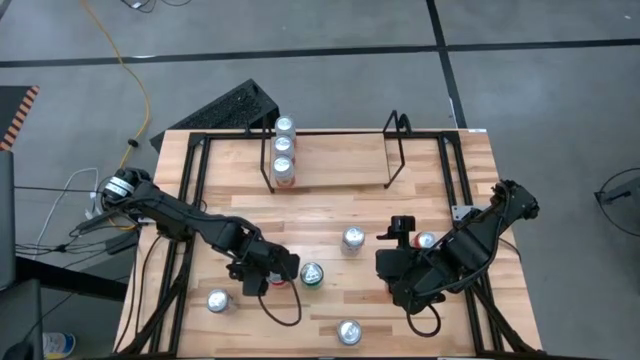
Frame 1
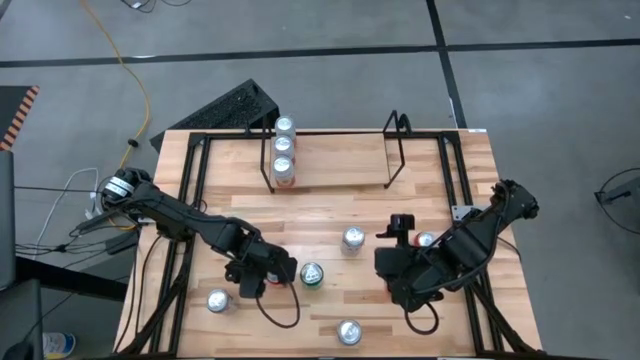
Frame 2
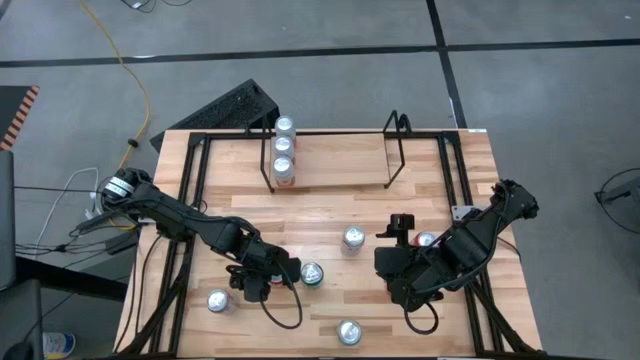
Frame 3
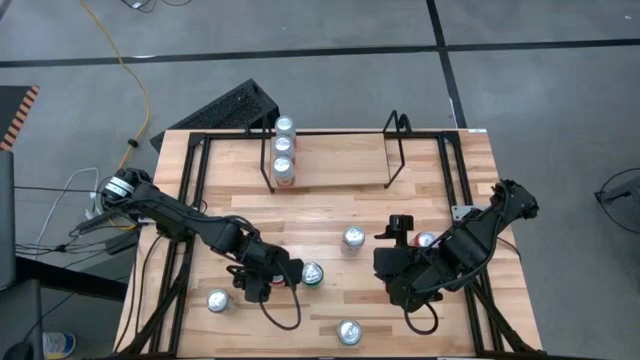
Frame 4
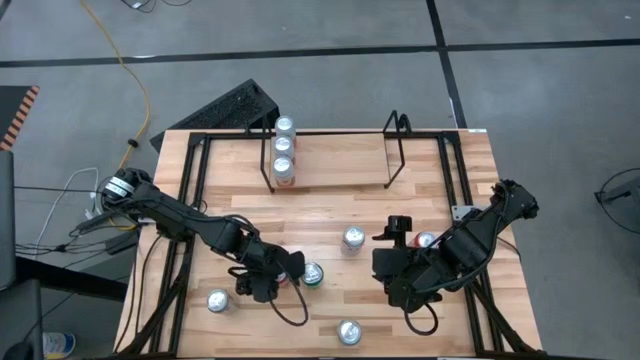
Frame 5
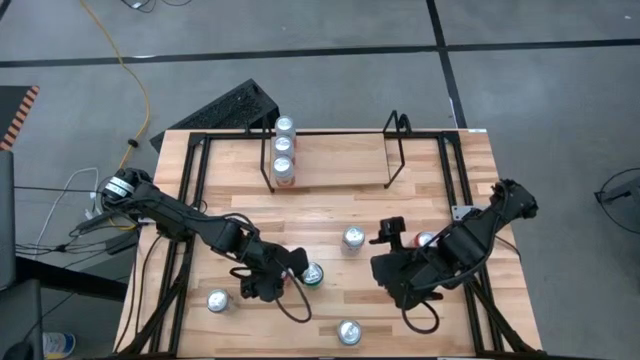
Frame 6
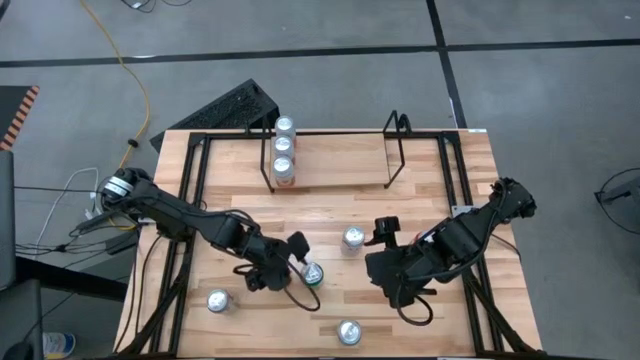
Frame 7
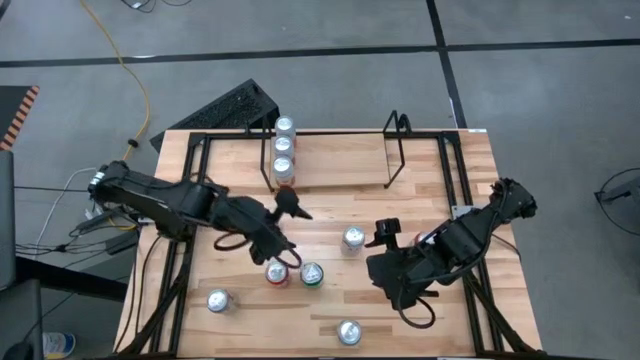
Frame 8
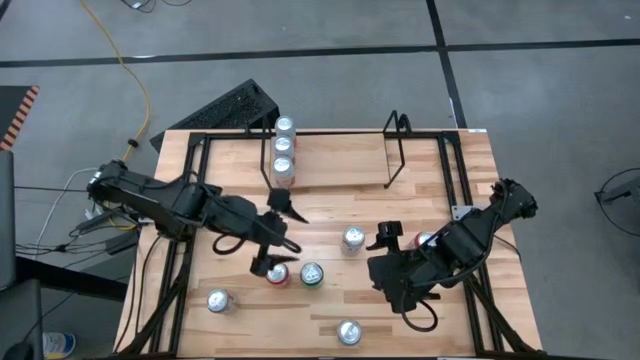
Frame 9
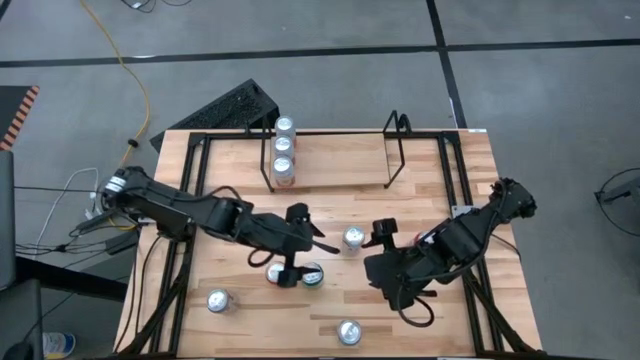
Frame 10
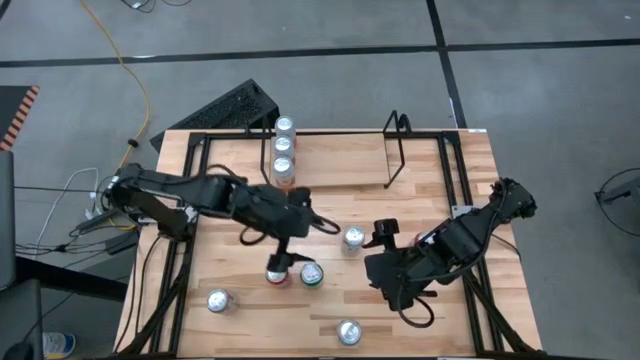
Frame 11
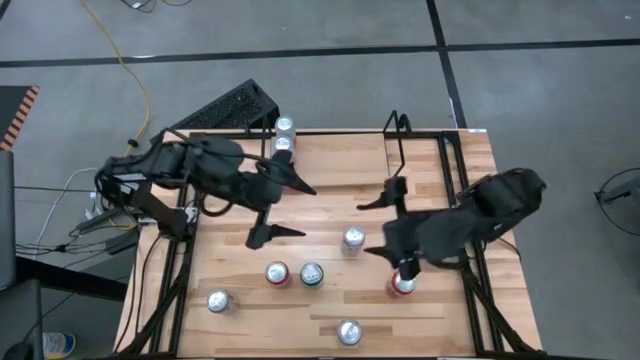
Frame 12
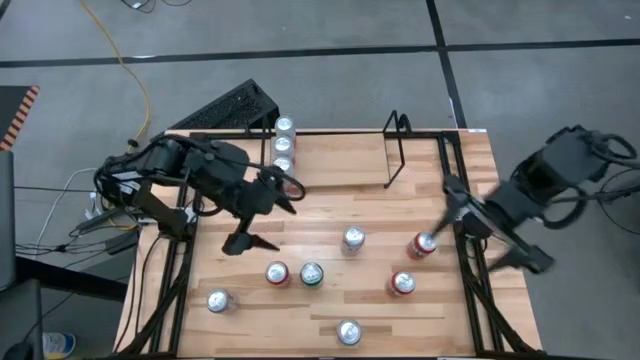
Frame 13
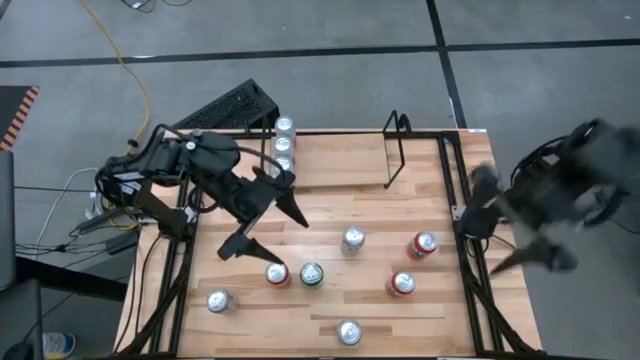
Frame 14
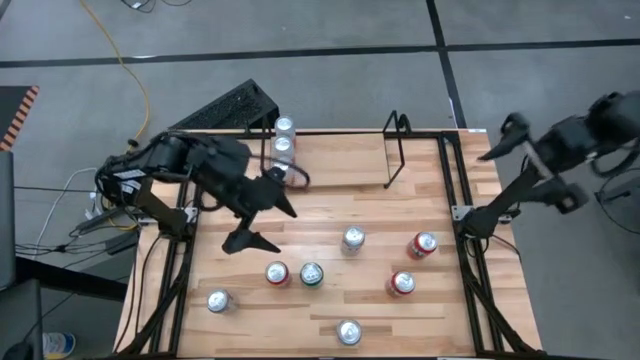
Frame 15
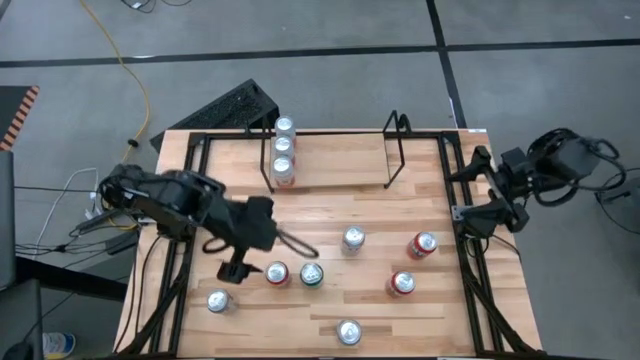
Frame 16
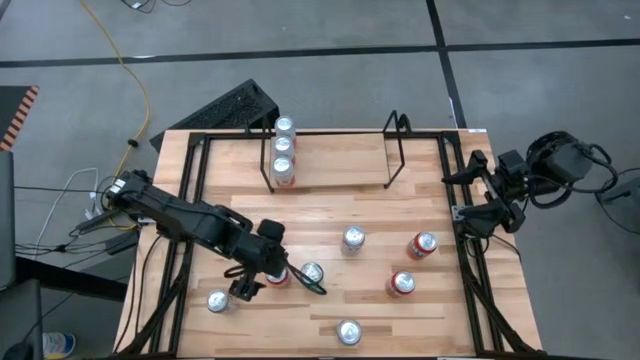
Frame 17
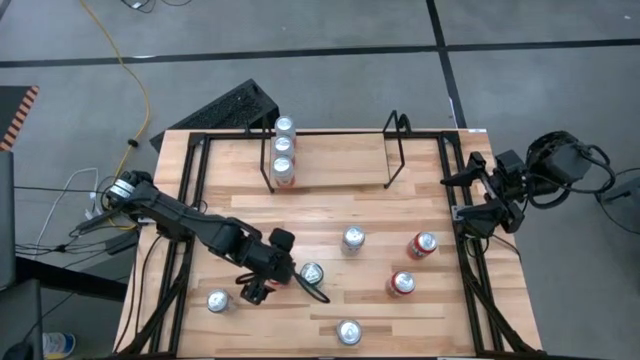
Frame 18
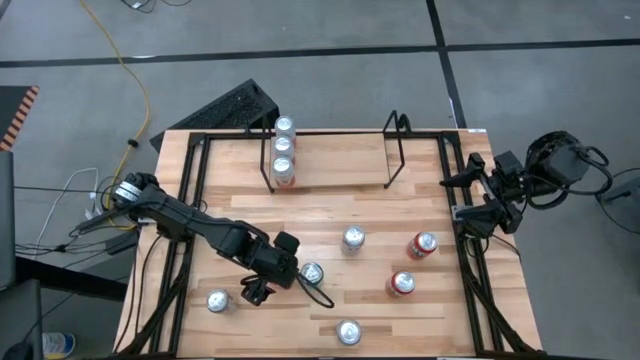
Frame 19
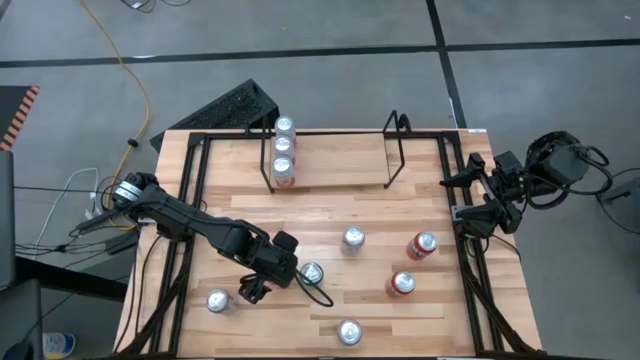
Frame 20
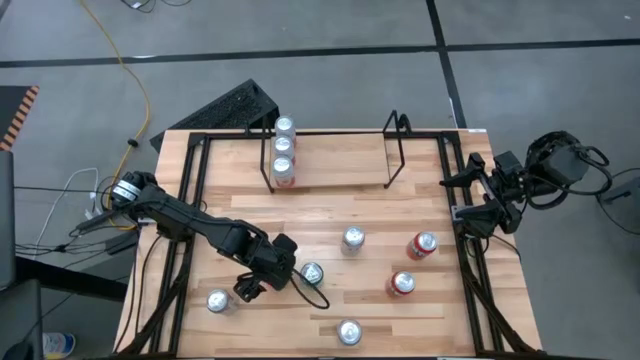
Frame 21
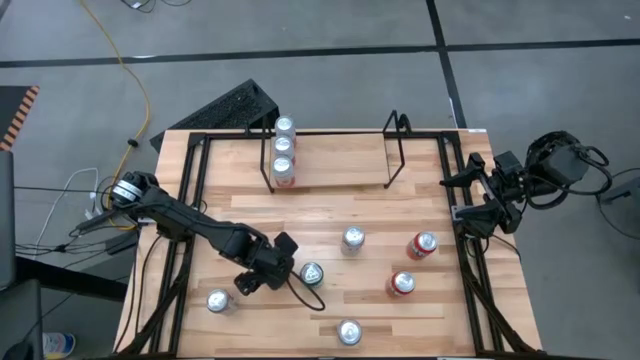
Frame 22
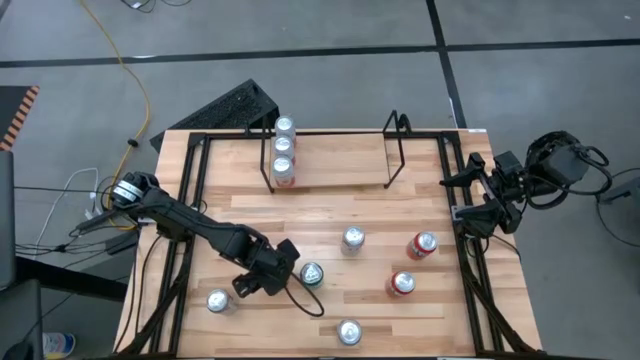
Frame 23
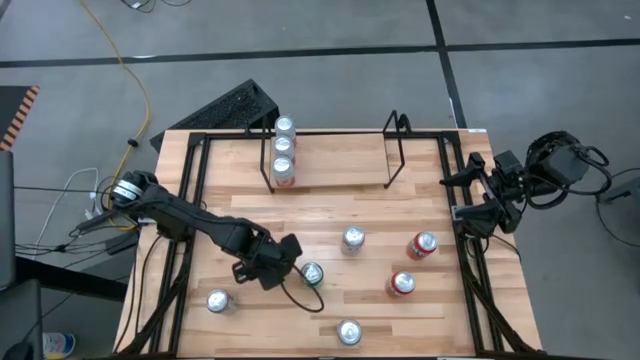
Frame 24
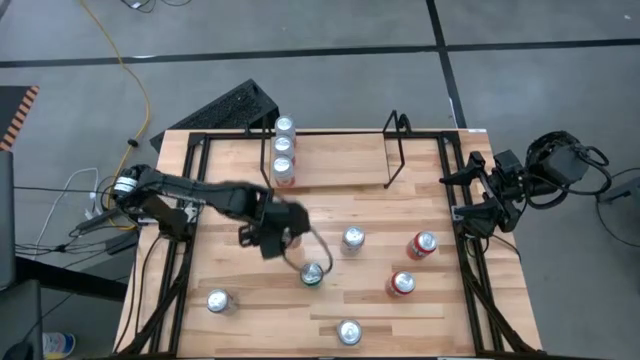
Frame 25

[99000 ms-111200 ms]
Task: Place canned beverage on shelf
Put the top left red soda can on the shelf

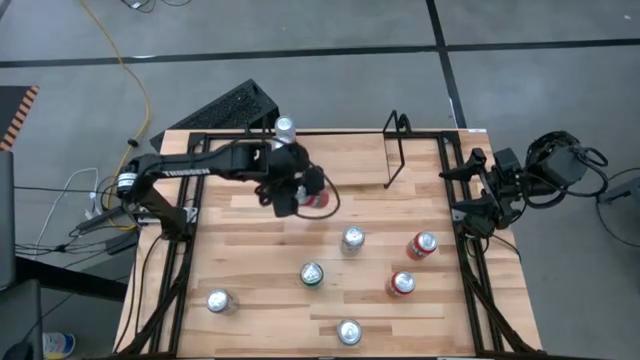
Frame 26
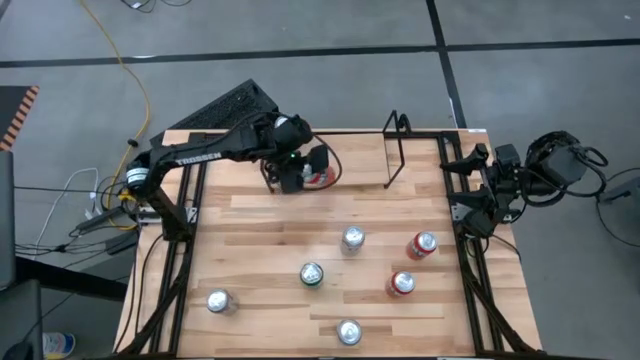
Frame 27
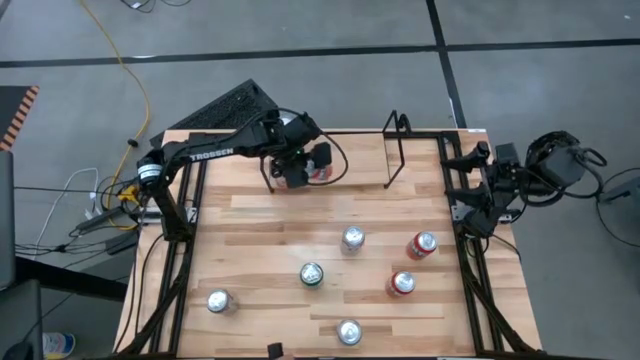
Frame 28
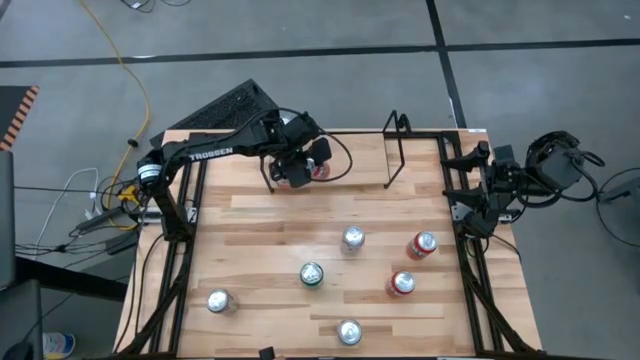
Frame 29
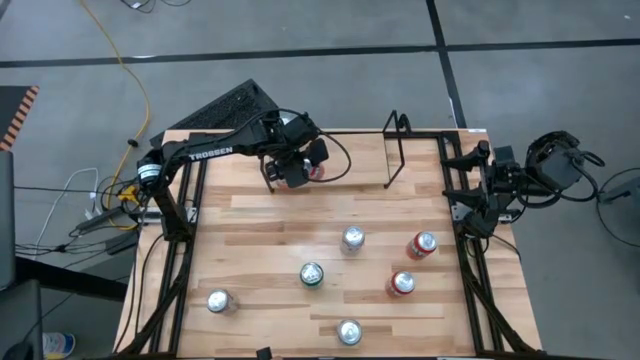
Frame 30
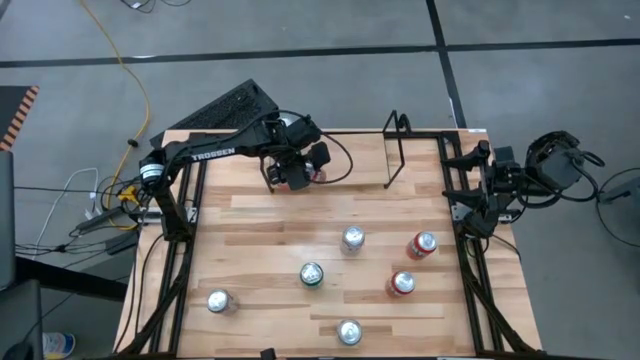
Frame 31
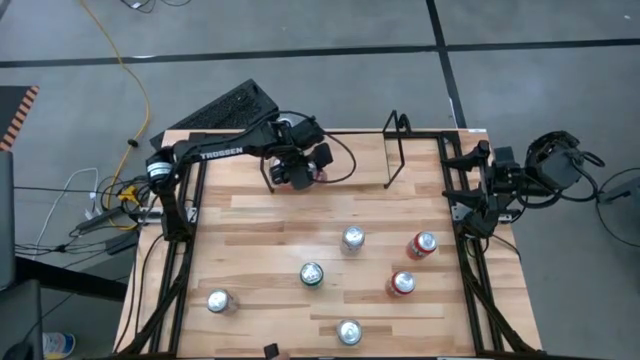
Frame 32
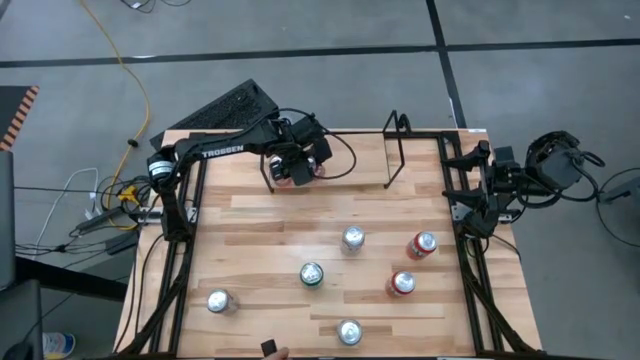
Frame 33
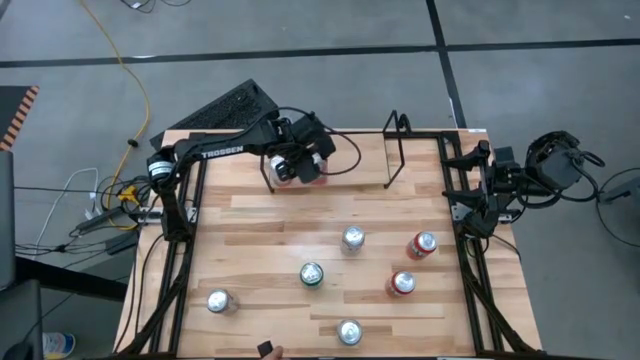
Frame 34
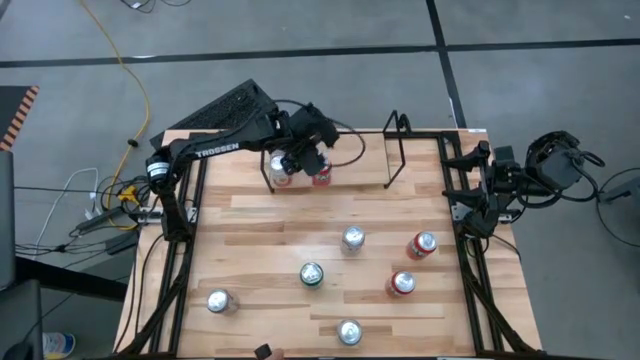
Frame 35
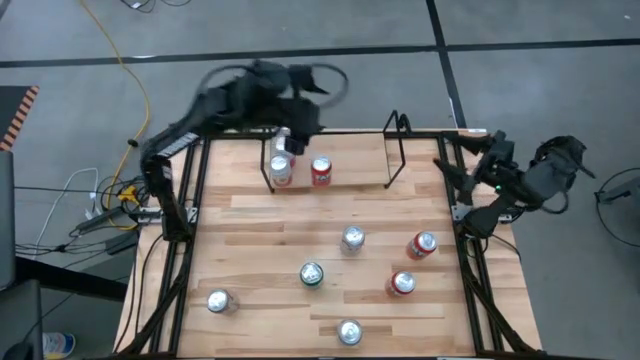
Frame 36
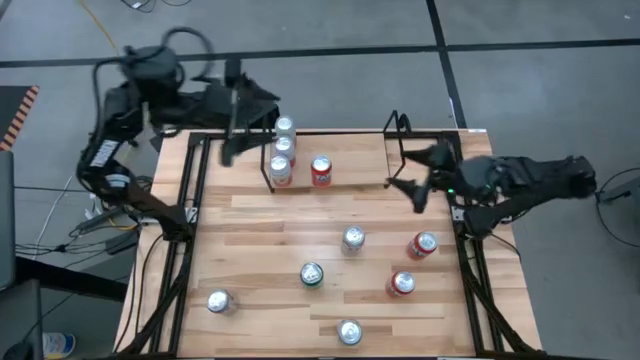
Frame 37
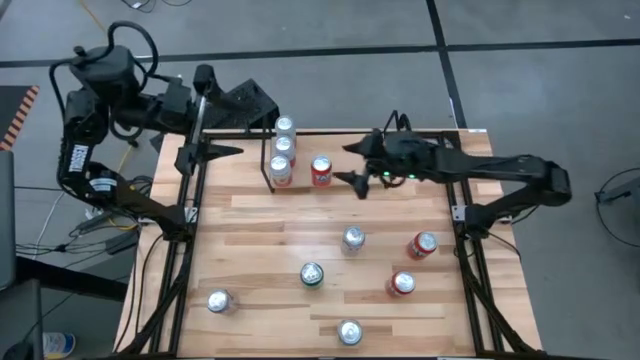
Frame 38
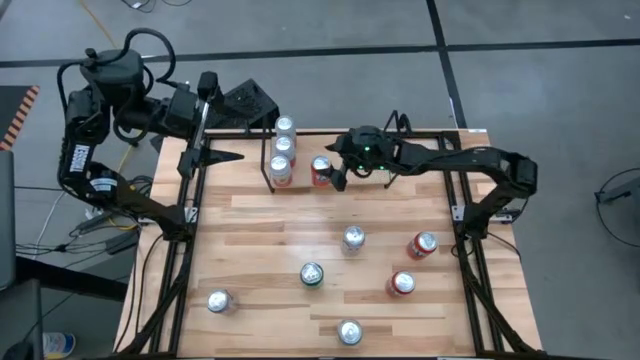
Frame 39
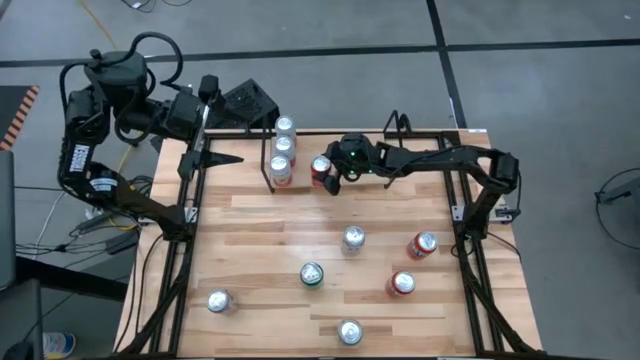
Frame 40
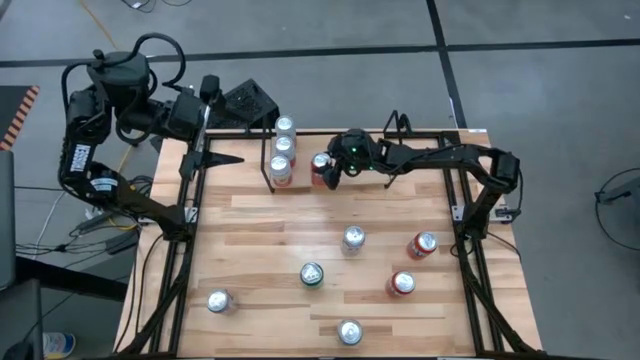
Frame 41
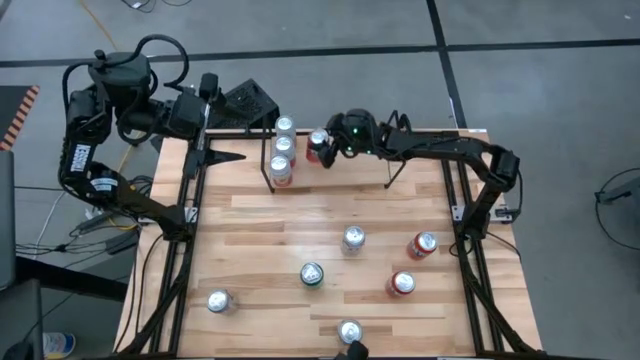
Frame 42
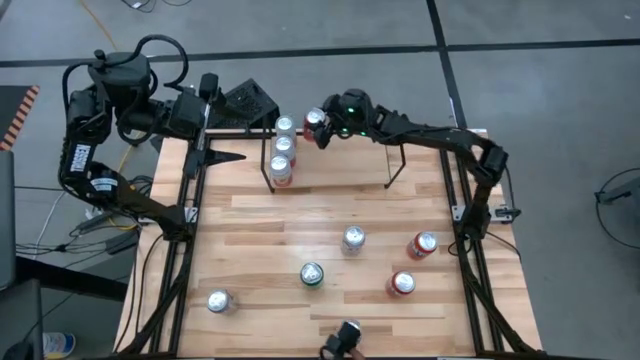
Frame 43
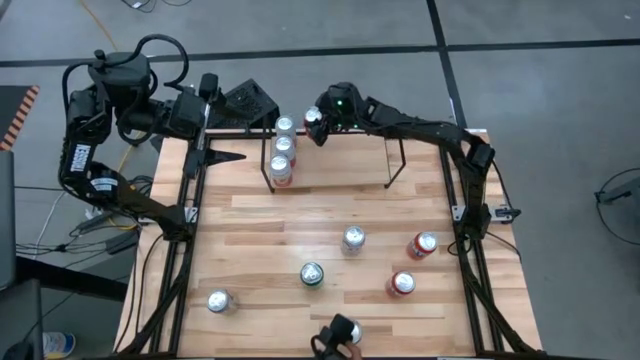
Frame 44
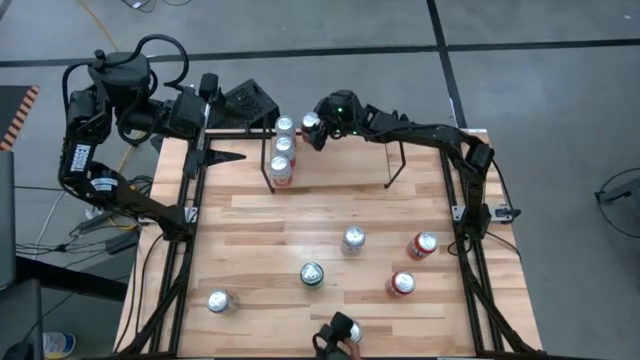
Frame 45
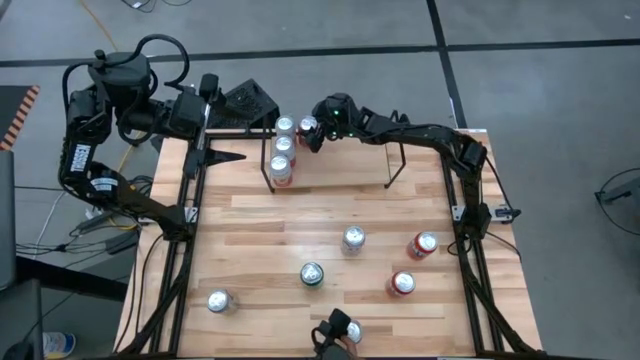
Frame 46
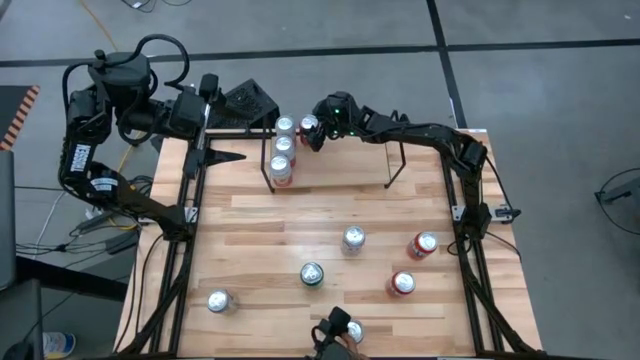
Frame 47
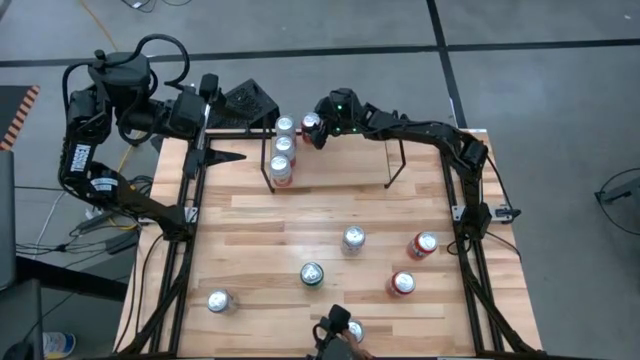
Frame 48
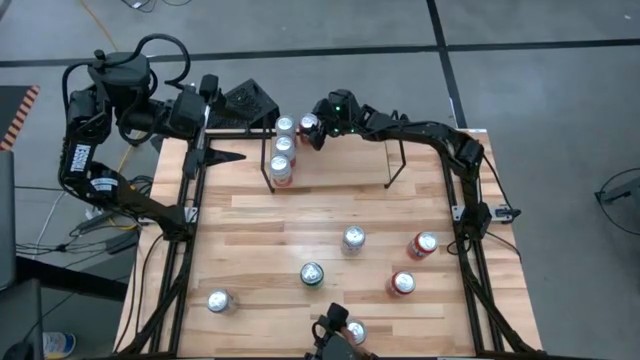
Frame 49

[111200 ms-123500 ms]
Put the top left red soda can on the shelf
